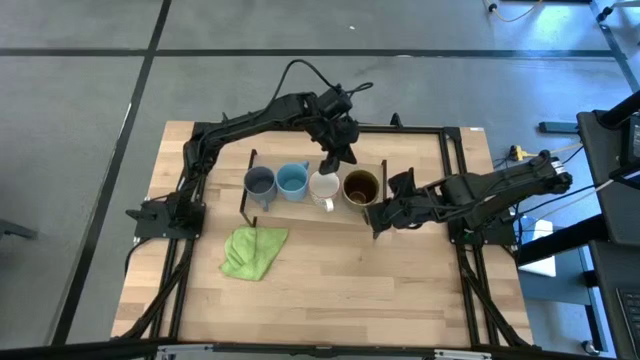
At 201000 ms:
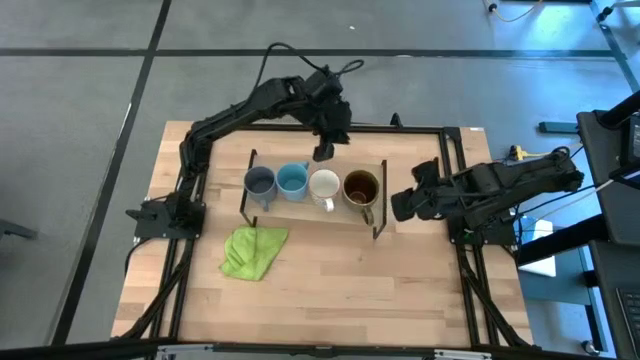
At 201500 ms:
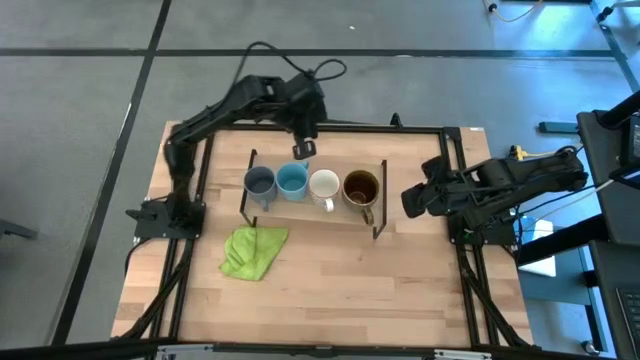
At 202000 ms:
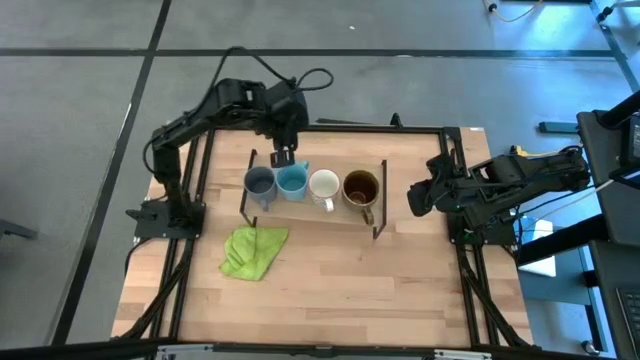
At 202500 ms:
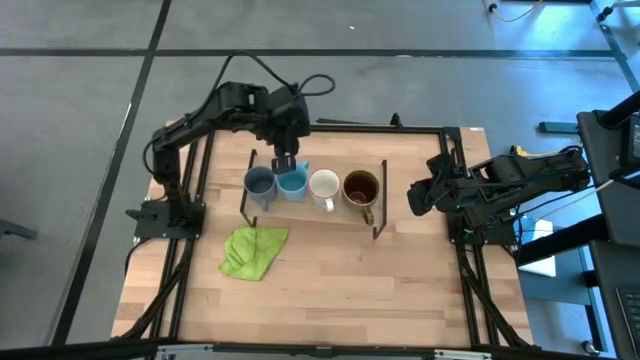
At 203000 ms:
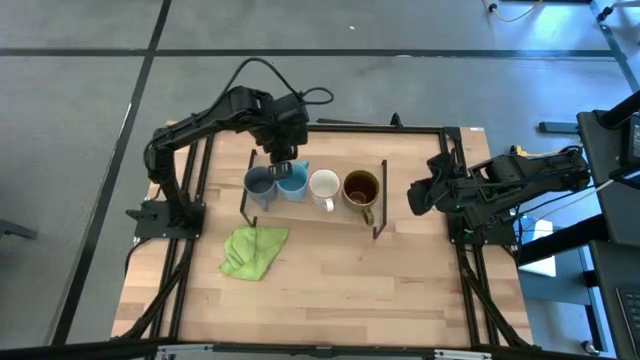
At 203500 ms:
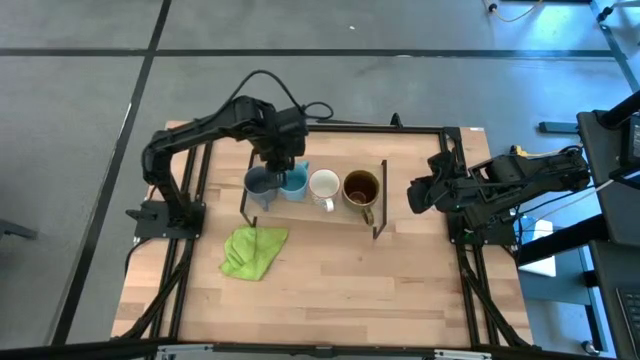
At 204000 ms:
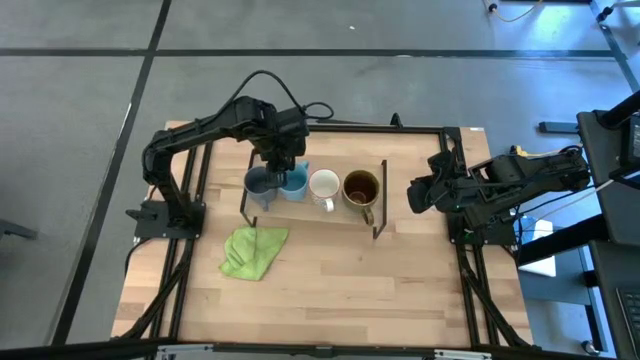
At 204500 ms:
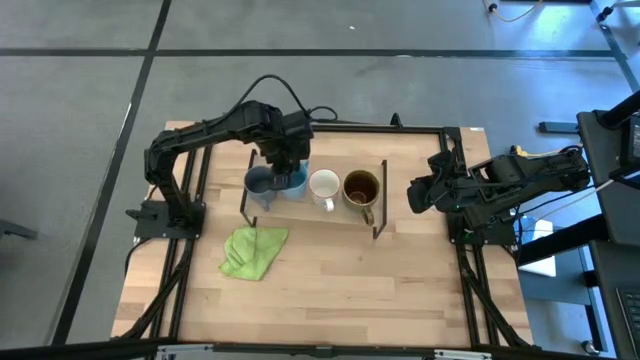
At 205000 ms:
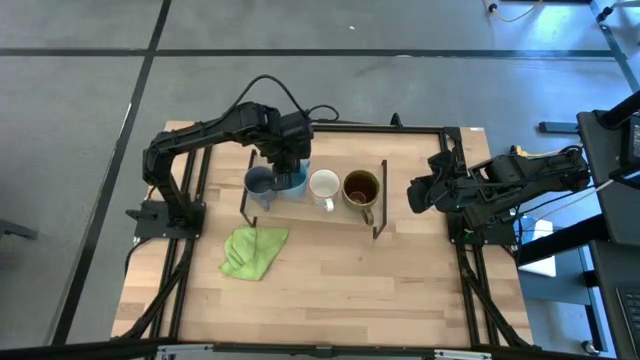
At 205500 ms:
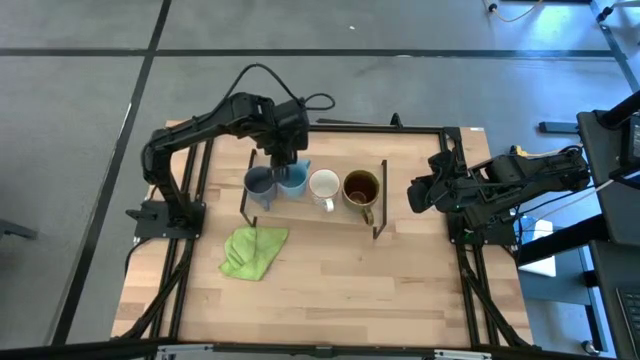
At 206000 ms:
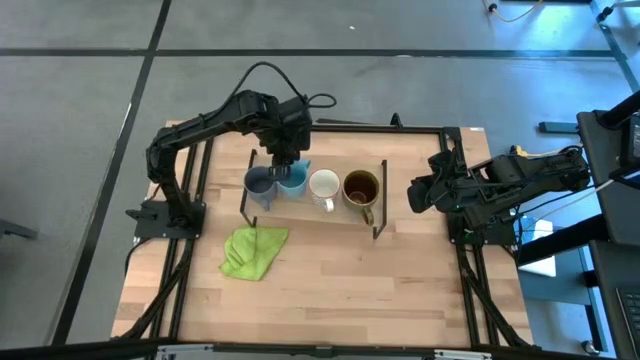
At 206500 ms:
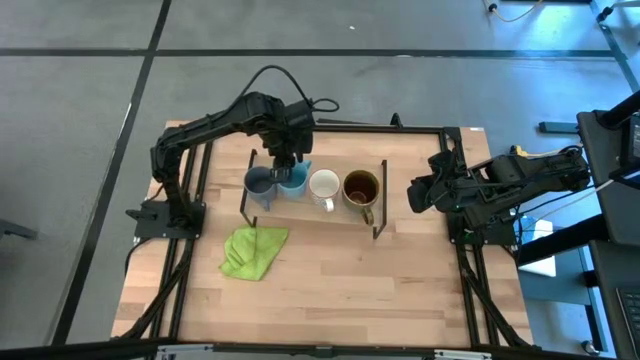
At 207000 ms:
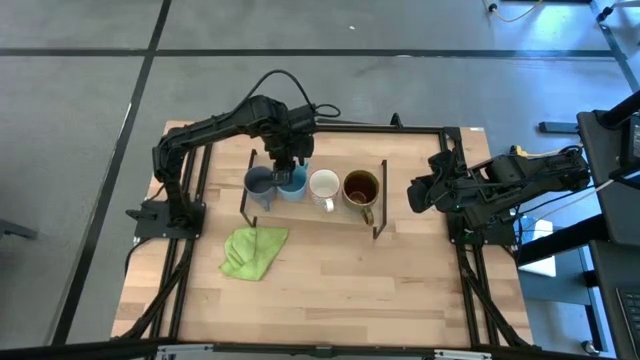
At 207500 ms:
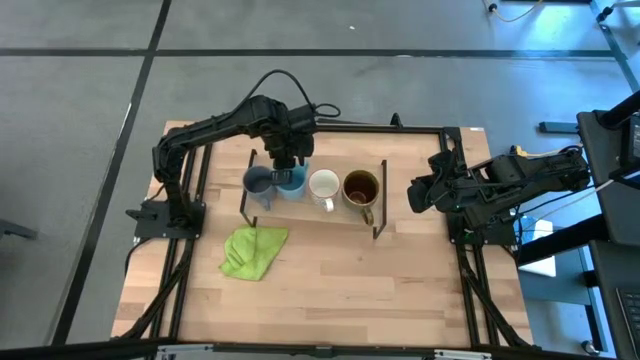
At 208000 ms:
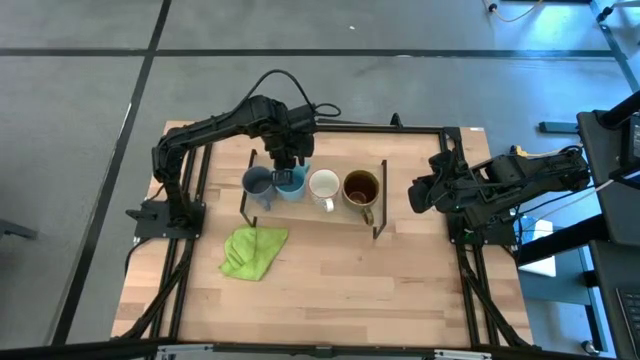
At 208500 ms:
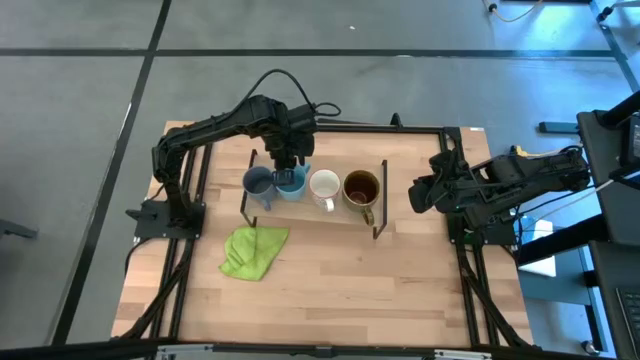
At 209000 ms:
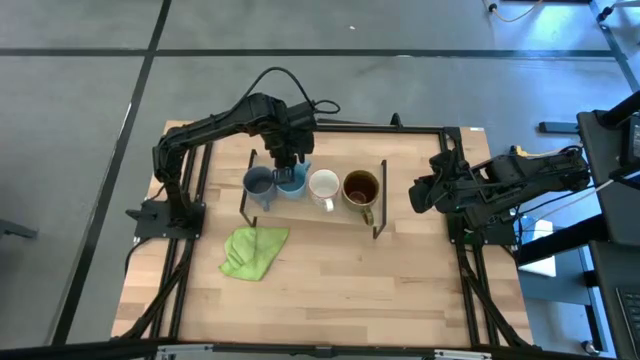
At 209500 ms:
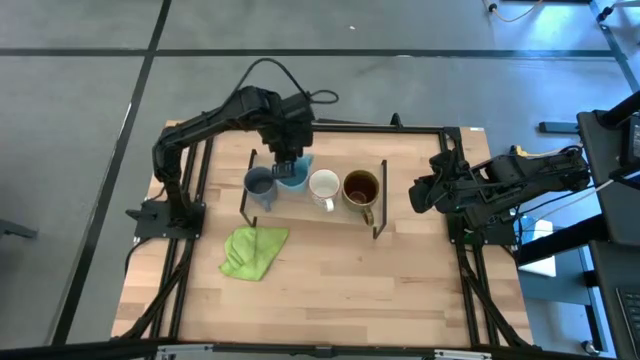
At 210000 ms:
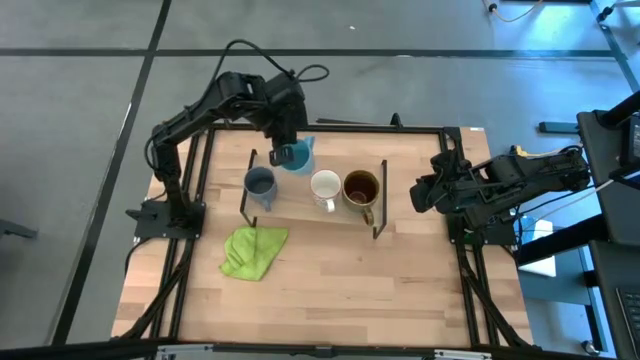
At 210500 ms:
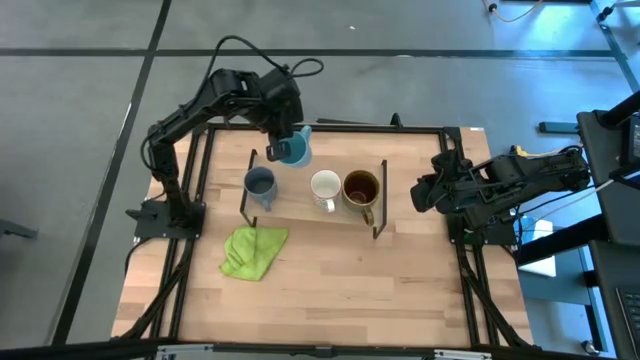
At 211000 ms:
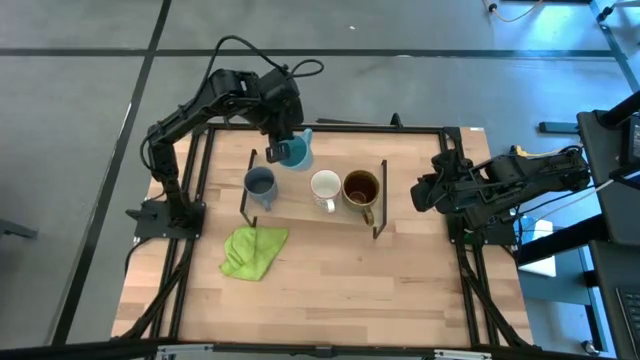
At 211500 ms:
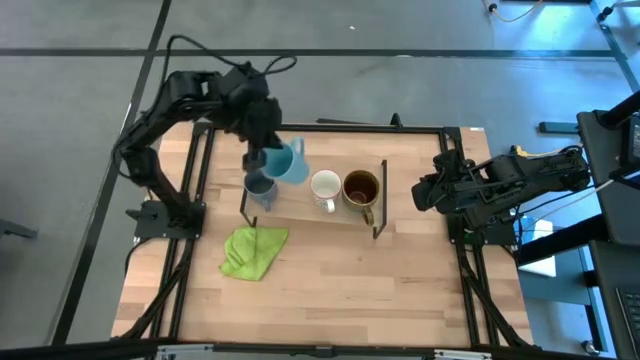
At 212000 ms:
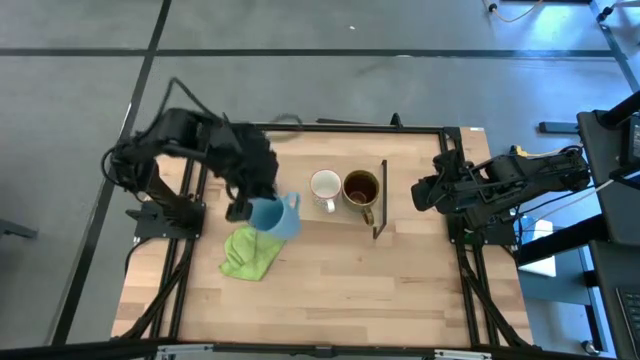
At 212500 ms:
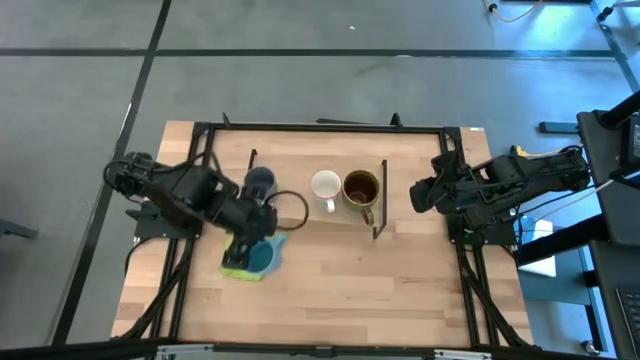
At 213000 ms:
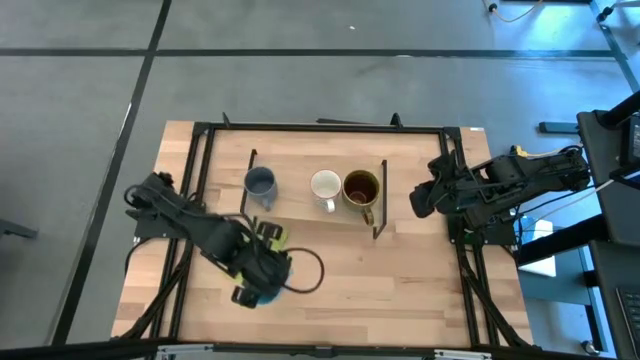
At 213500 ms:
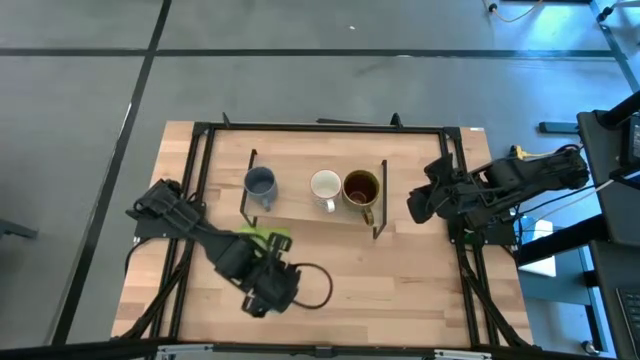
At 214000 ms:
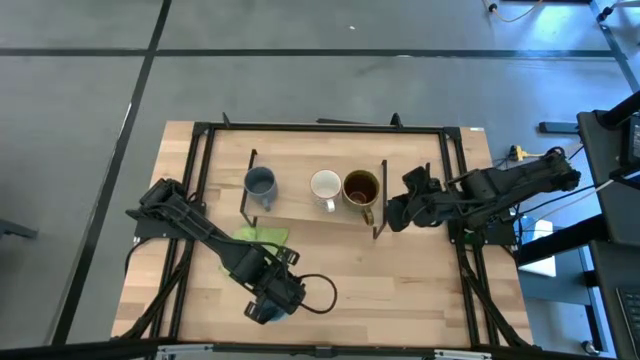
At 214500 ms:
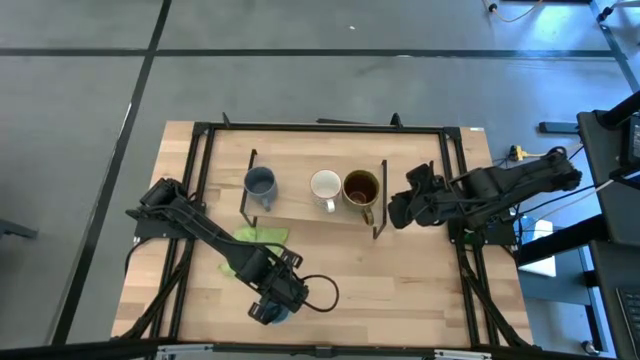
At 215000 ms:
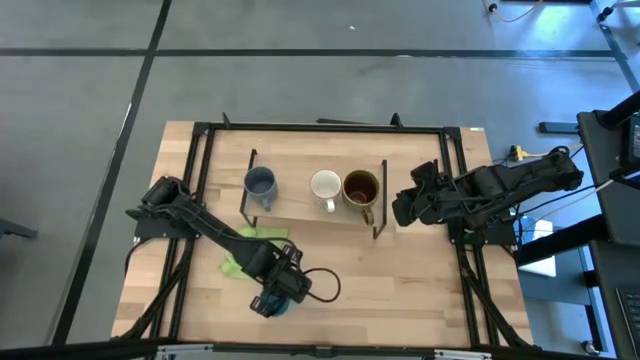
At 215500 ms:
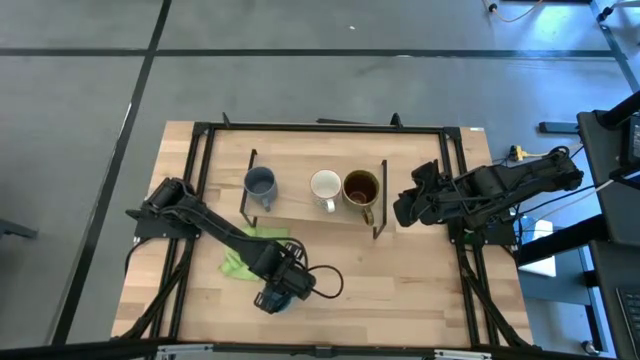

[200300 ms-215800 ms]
Task: Stack small to large cups/mugs on shelf
Remove the blue mug from the shelf

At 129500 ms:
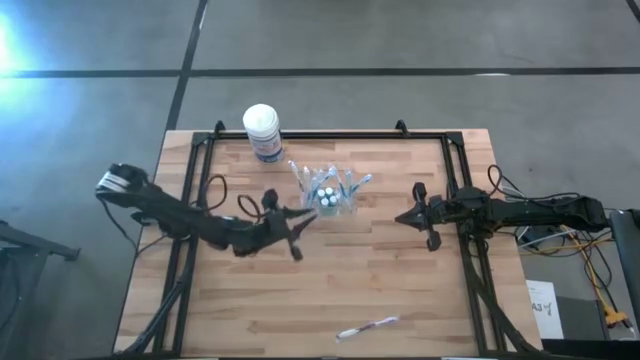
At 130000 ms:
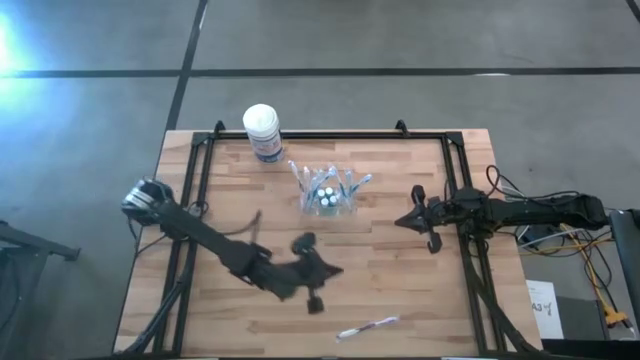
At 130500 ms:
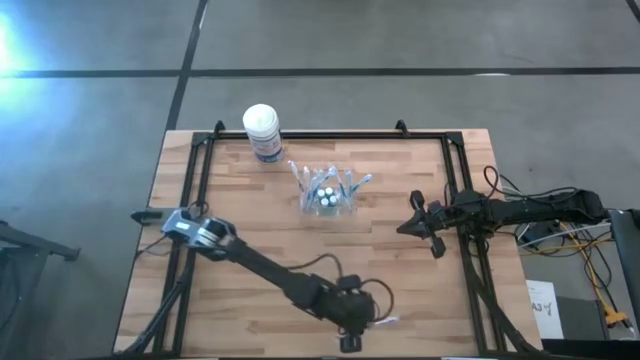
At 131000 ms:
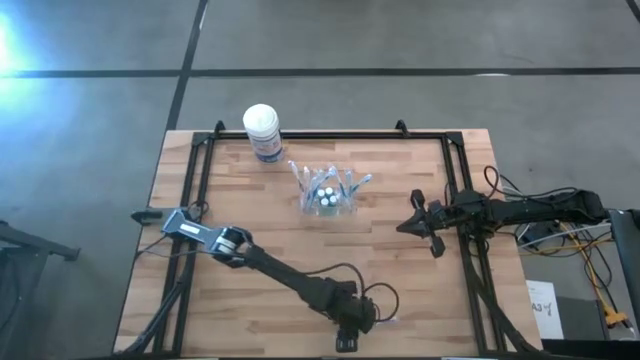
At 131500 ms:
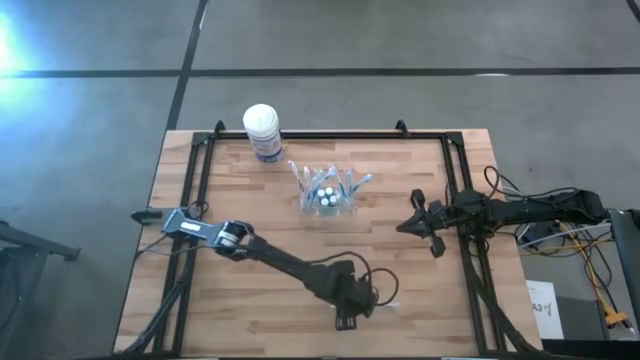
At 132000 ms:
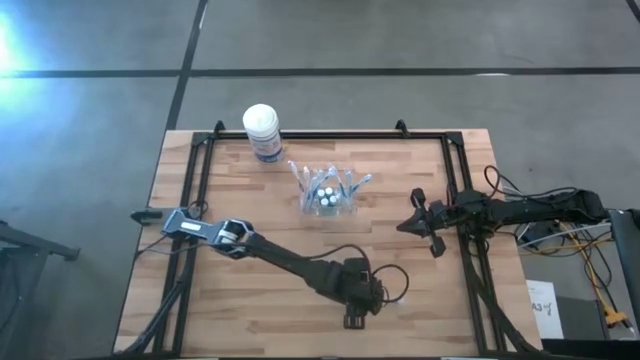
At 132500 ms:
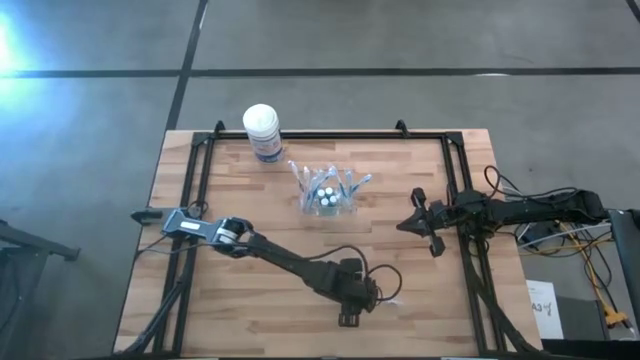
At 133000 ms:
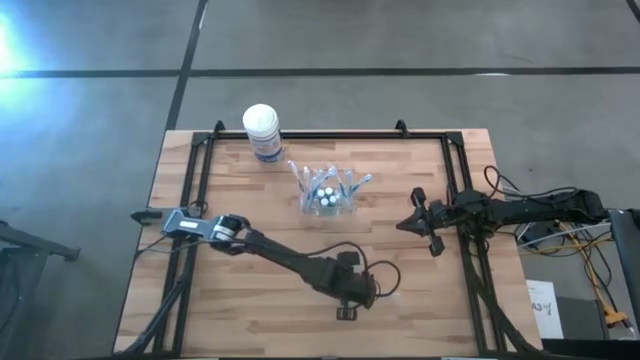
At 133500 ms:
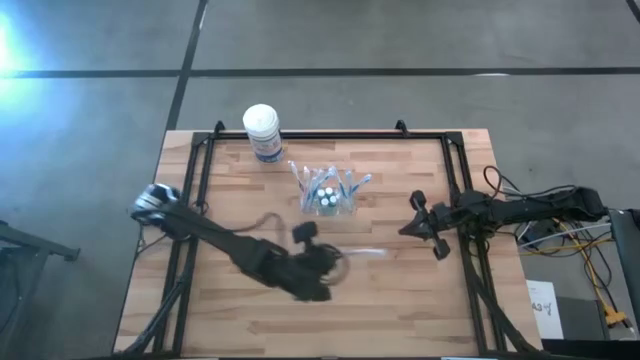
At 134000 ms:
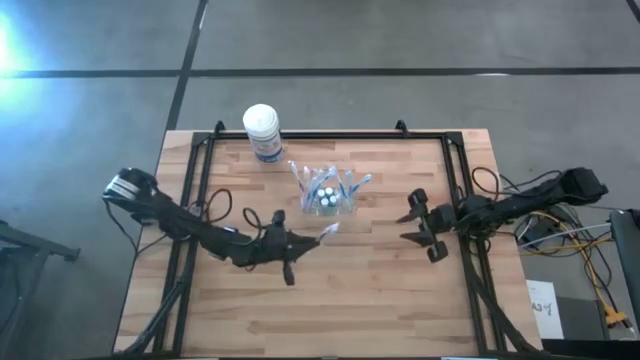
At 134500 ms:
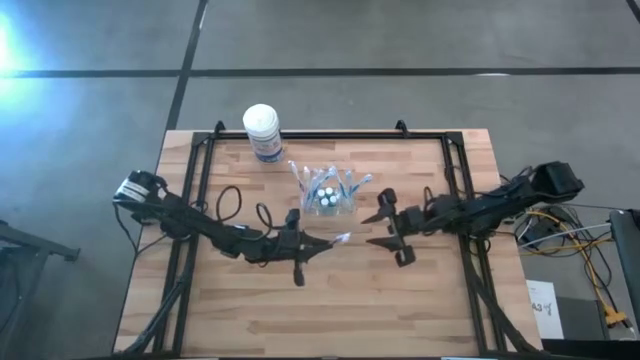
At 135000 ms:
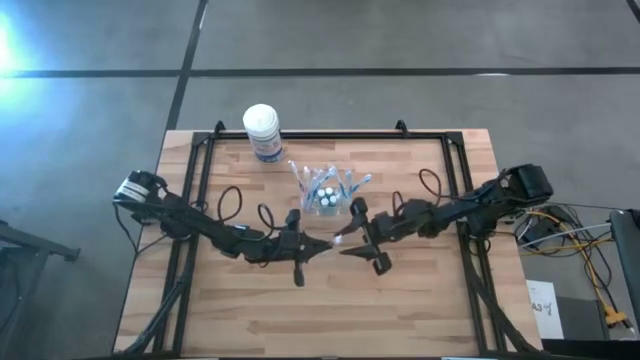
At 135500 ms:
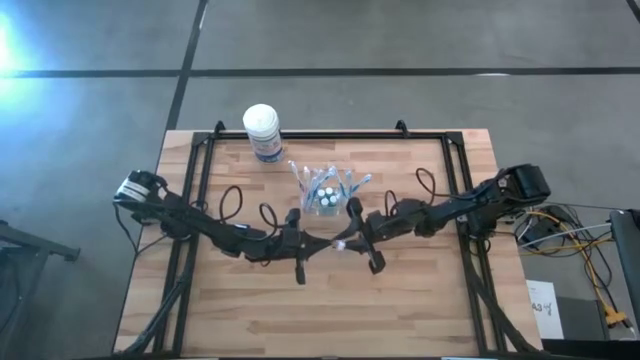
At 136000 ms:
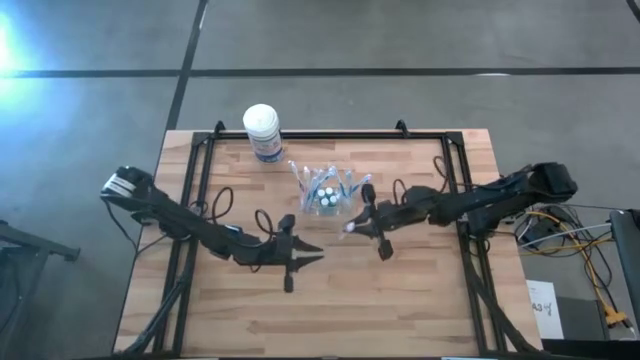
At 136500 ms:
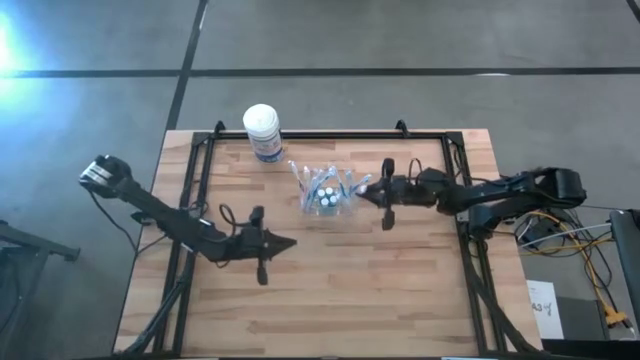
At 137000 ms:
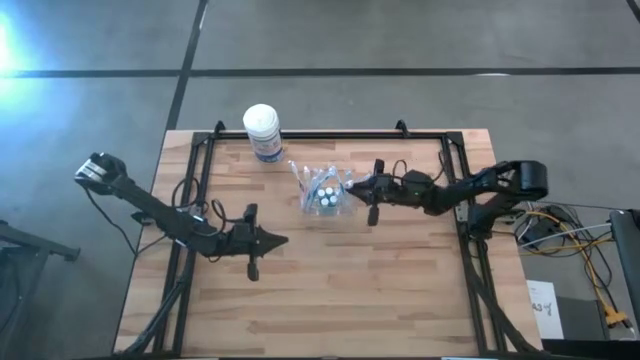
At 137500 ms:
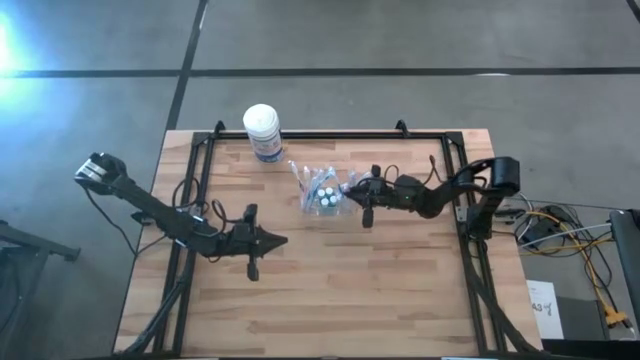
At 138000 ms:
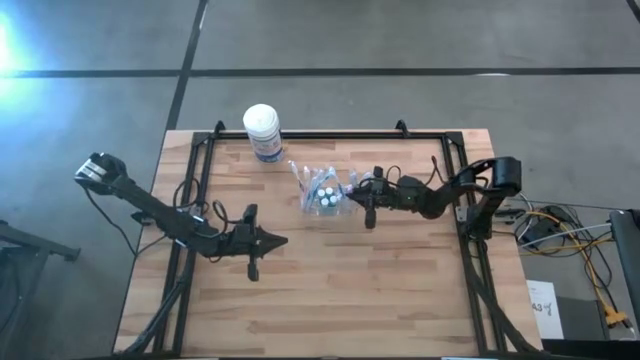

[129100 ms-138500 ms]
Task: Pick & Place toothbrushing station
Put the purple toothbrush into the transparent organizer
